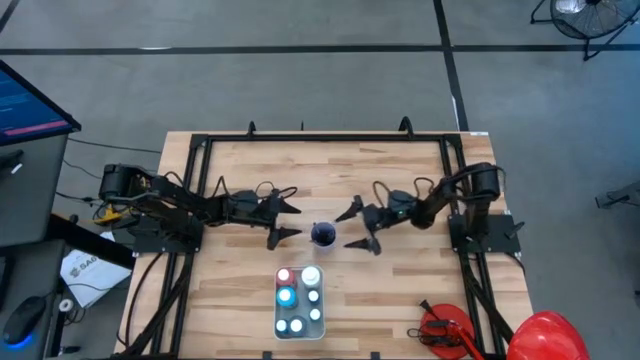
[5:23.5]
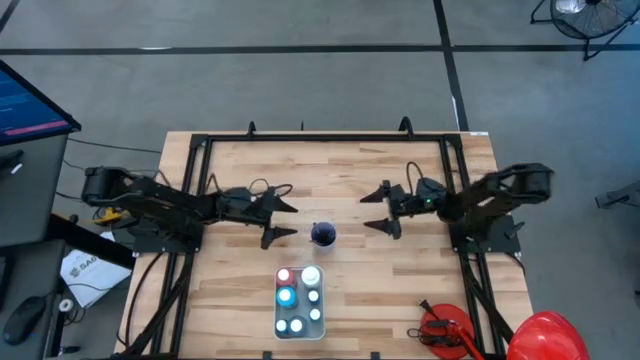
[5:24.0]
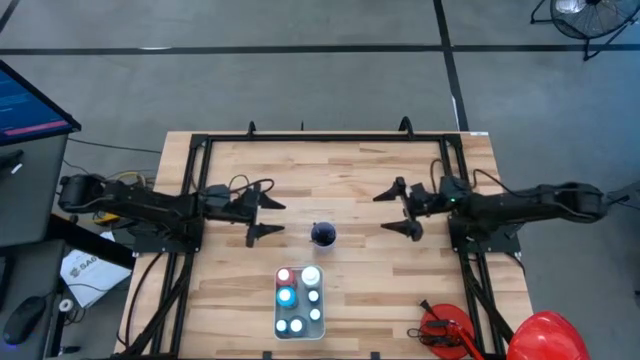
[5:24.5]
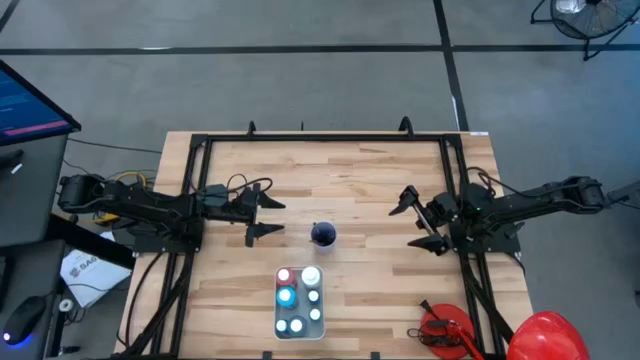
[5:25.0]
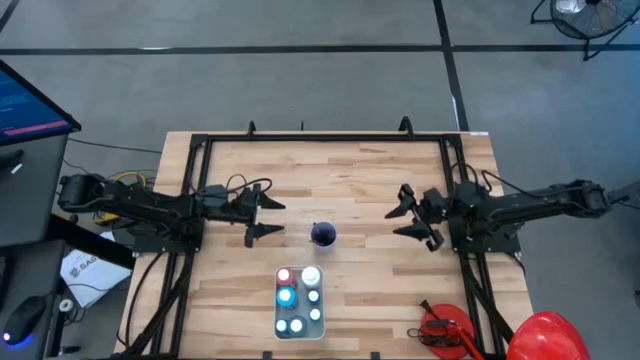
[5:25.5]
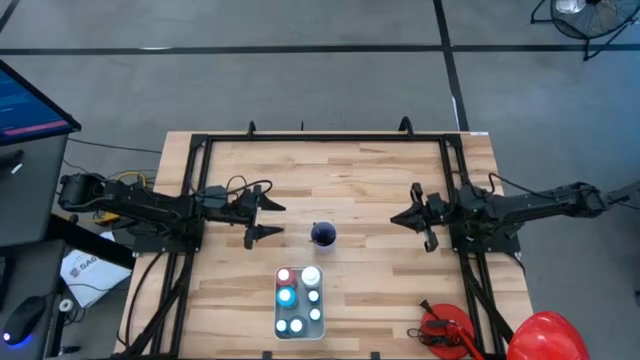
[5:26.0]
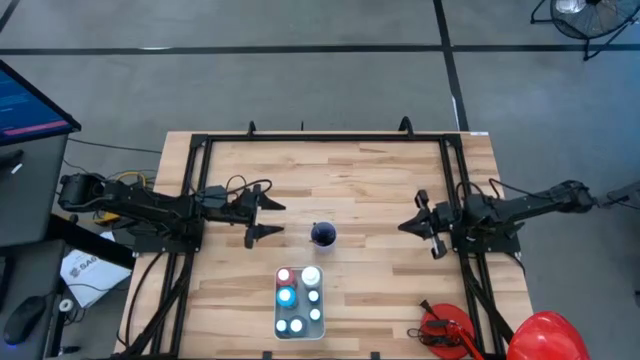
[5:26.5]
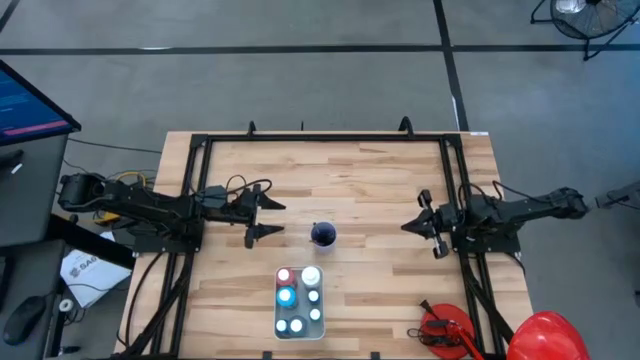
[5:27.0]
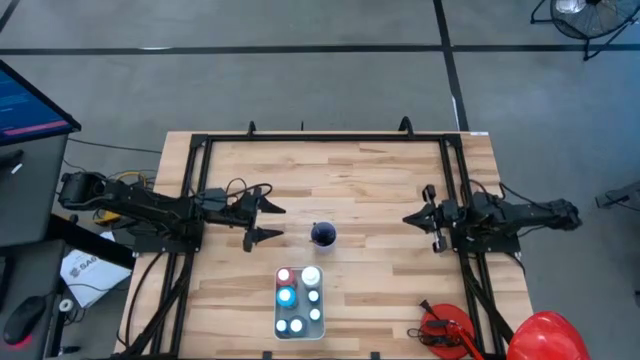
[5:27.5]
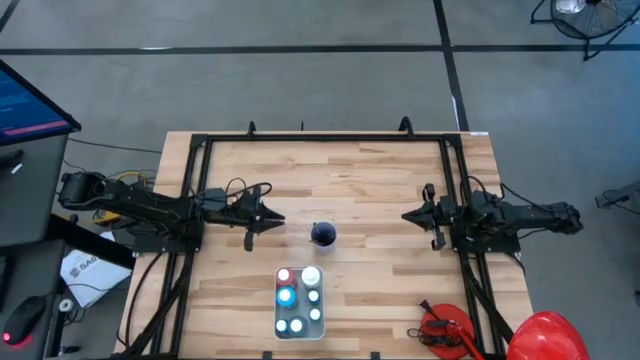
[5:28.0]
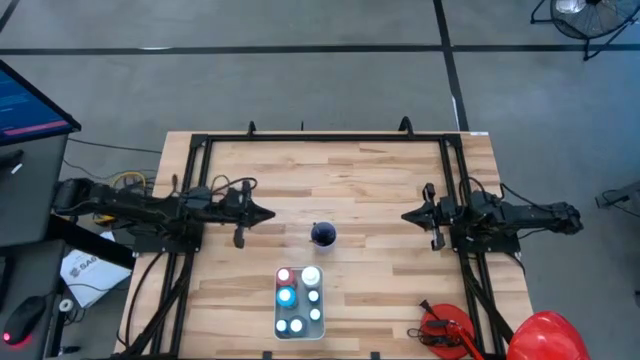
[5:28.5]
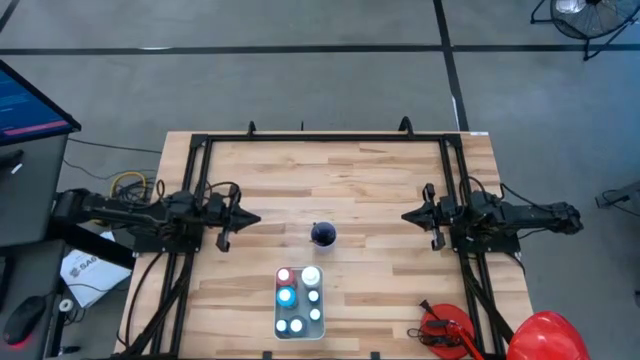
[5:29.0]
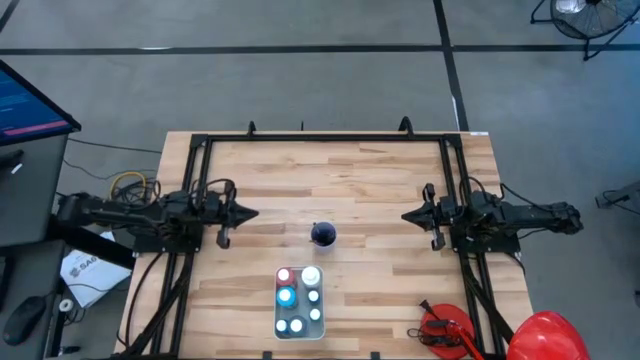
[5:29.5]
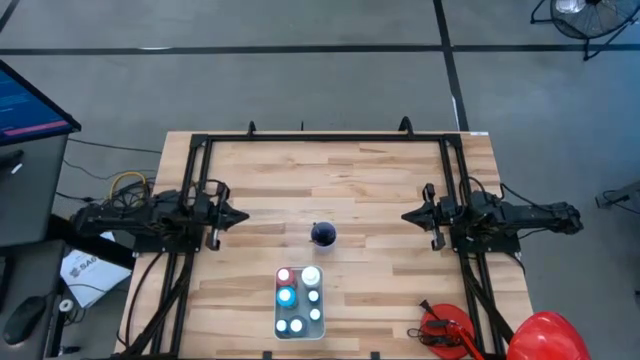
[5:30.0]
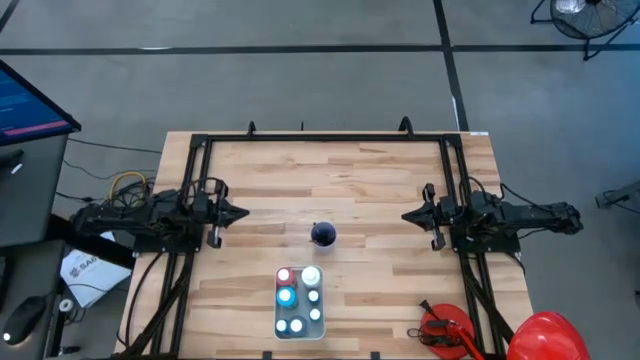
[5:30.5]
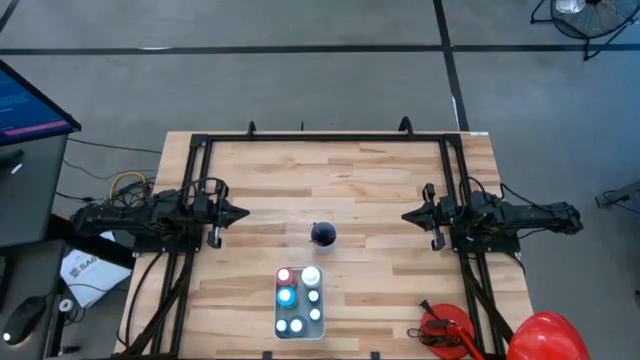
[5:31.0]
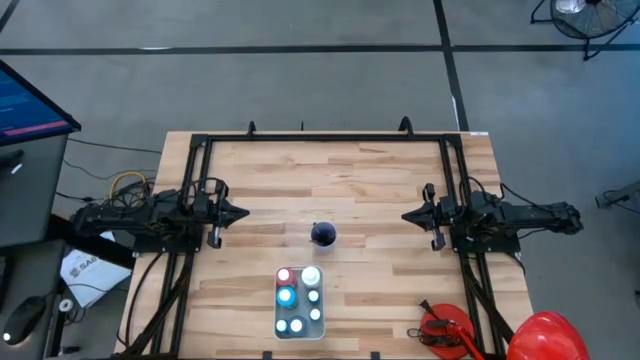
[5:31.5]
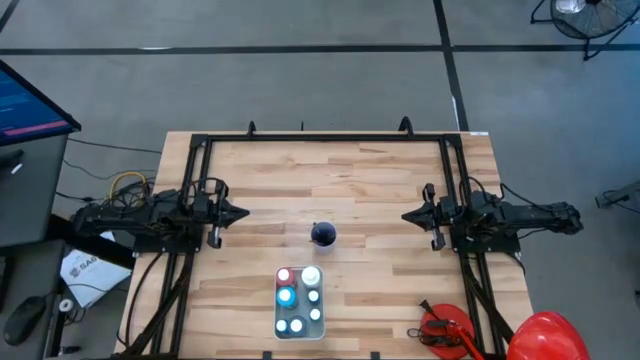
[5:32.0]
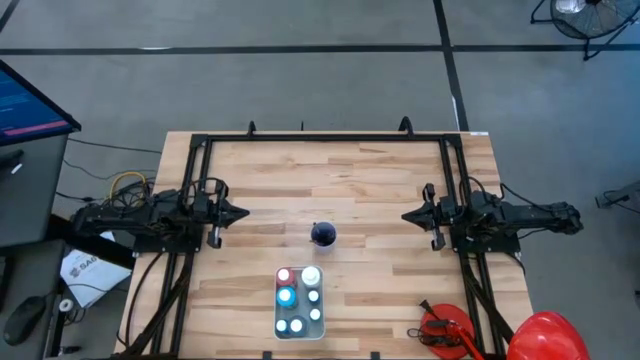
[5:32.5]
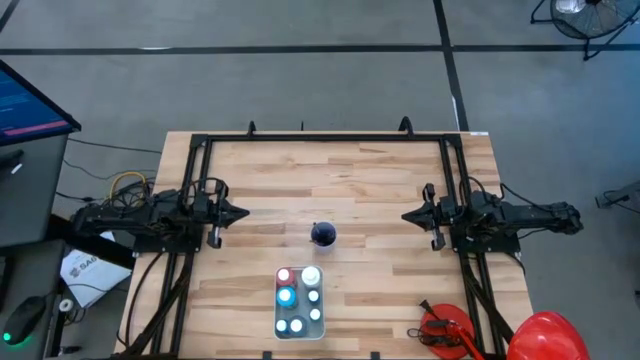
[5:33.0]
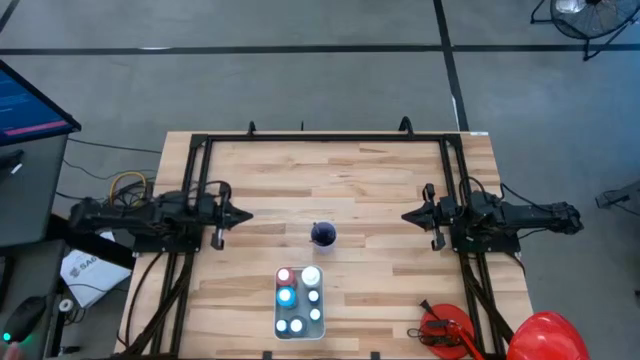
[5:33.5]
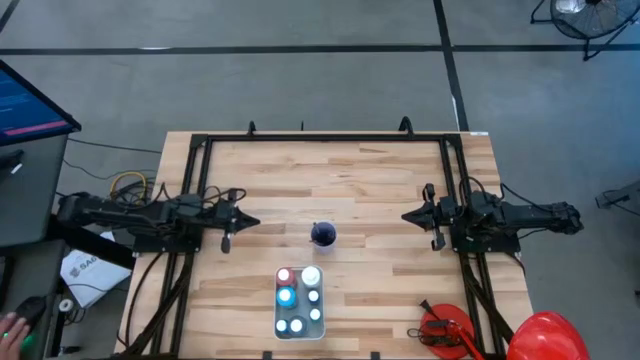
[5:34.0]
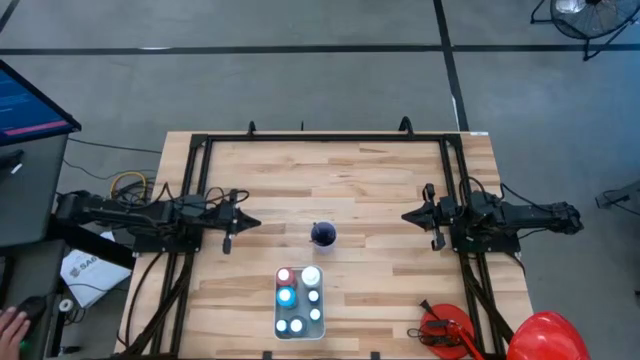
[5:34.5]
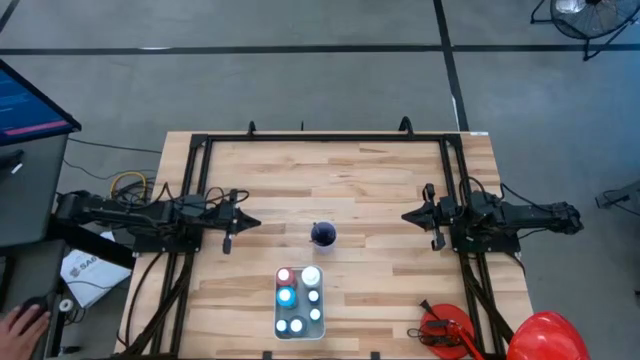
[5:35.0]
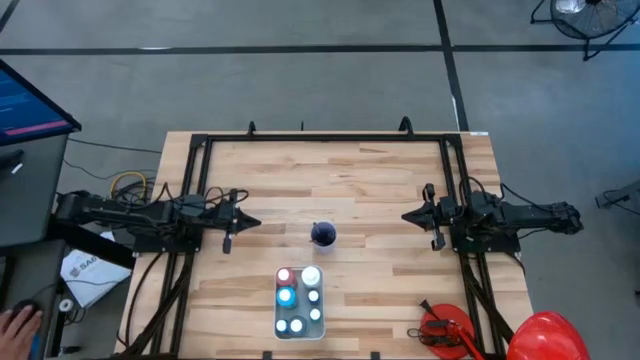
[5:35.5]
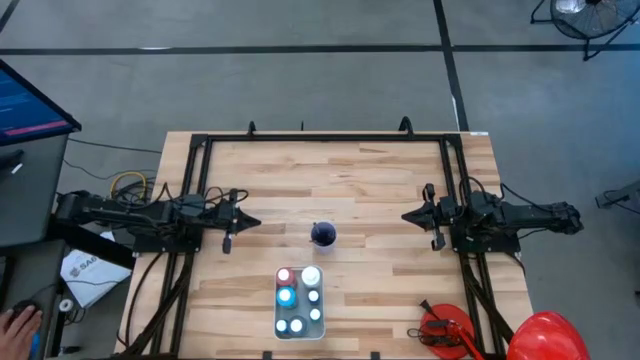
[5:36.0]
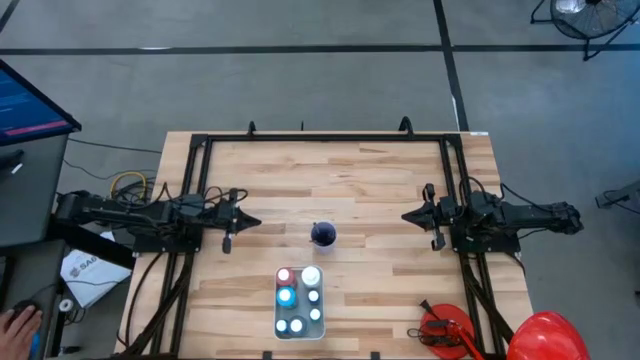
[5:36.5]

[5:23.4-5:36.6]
Task: Pick & Place Paint Supplies
Return to home position

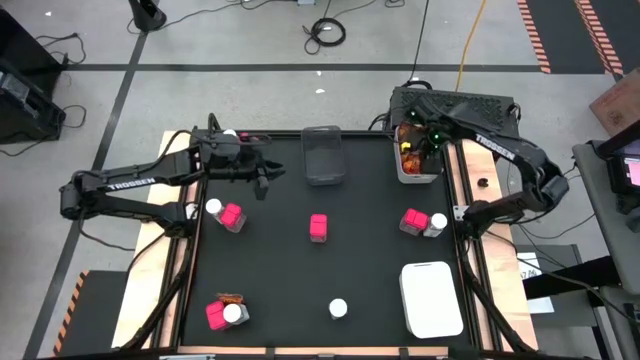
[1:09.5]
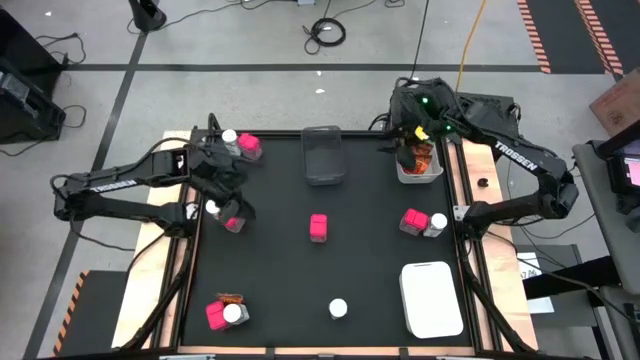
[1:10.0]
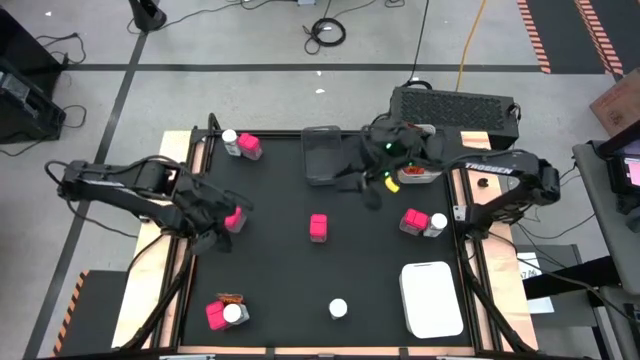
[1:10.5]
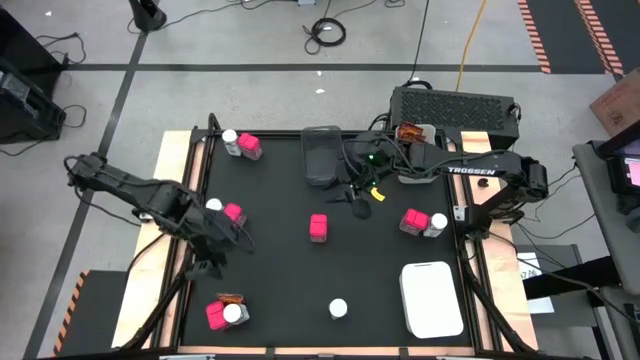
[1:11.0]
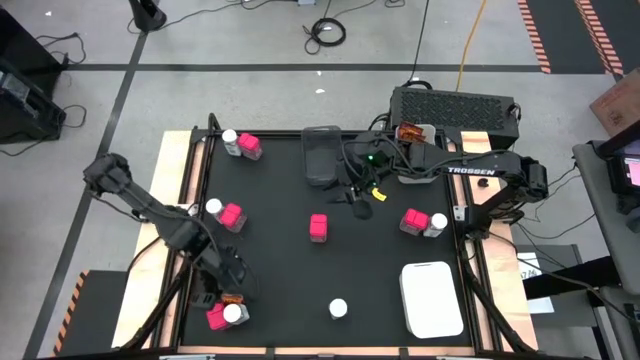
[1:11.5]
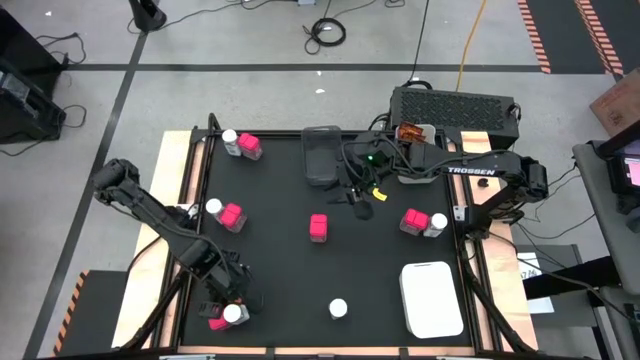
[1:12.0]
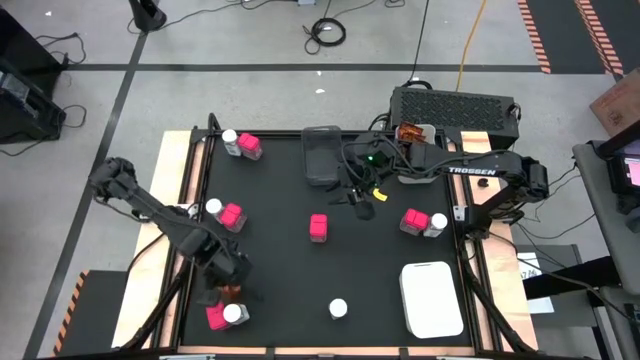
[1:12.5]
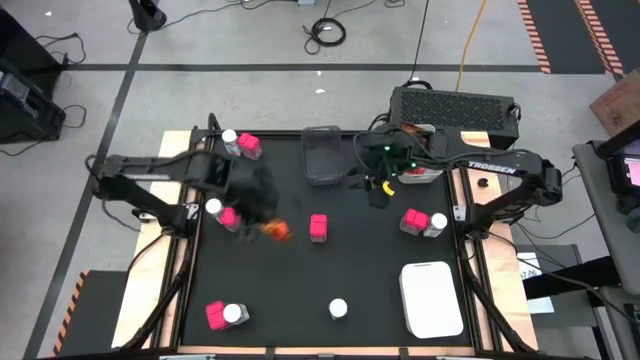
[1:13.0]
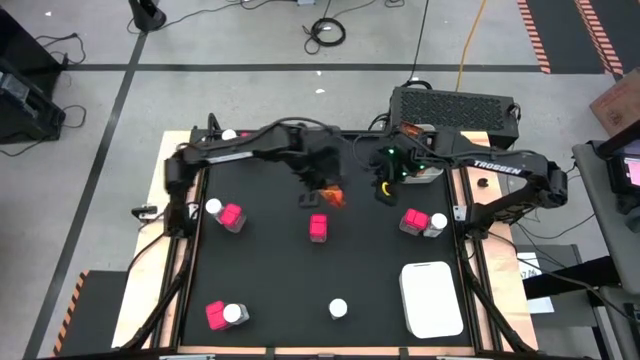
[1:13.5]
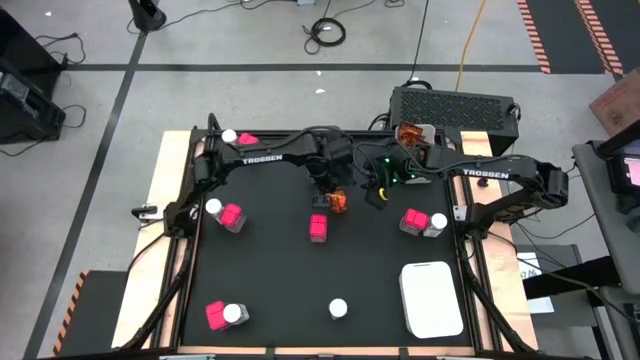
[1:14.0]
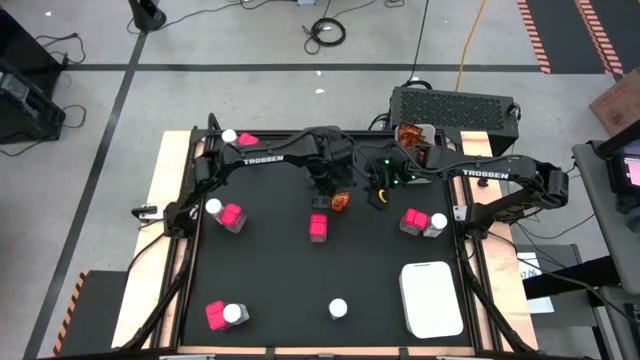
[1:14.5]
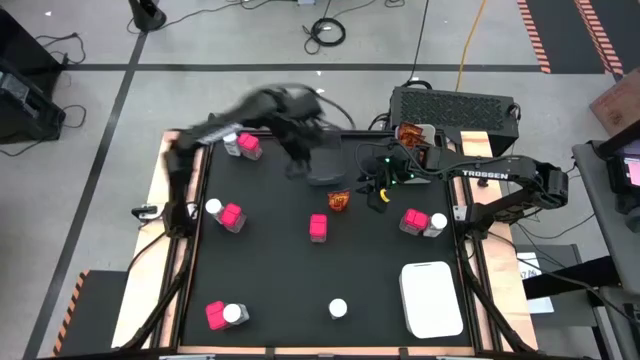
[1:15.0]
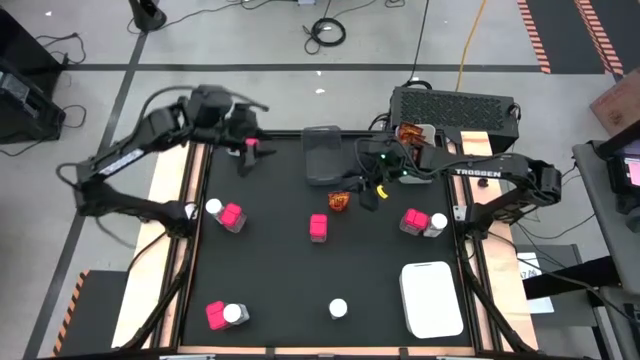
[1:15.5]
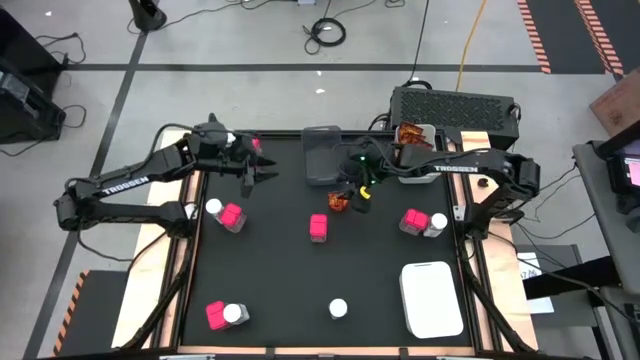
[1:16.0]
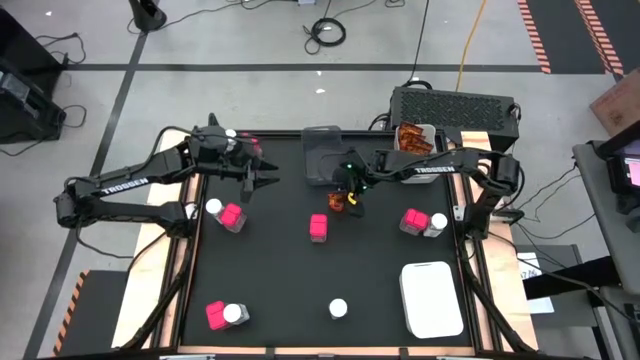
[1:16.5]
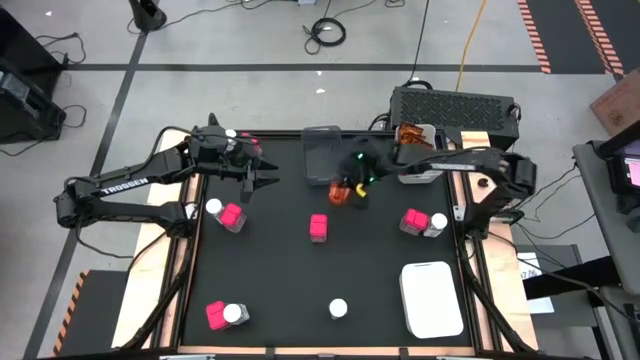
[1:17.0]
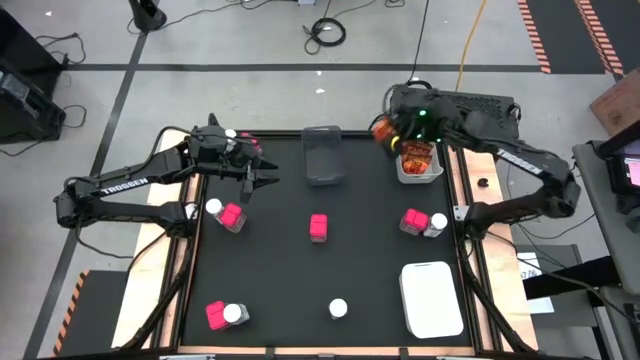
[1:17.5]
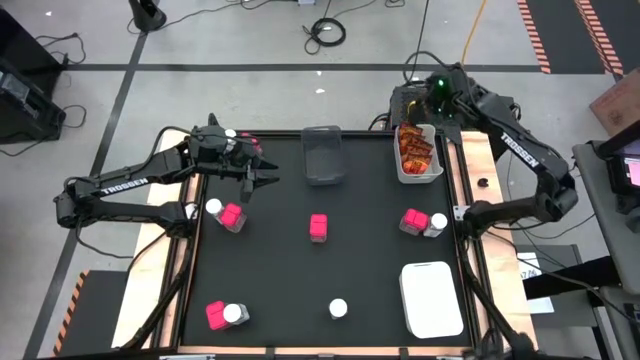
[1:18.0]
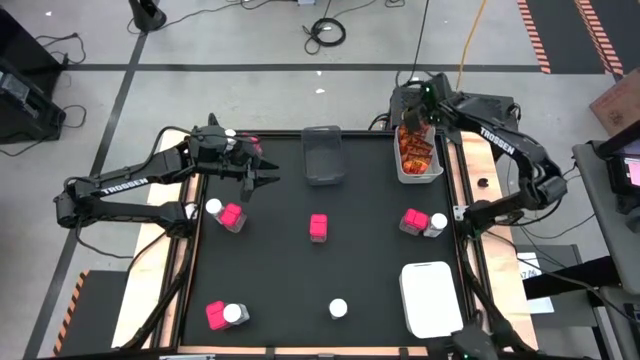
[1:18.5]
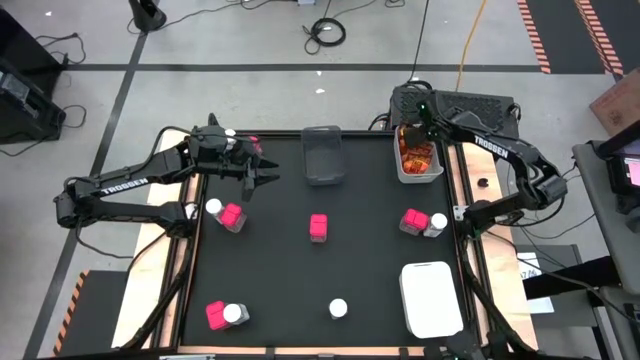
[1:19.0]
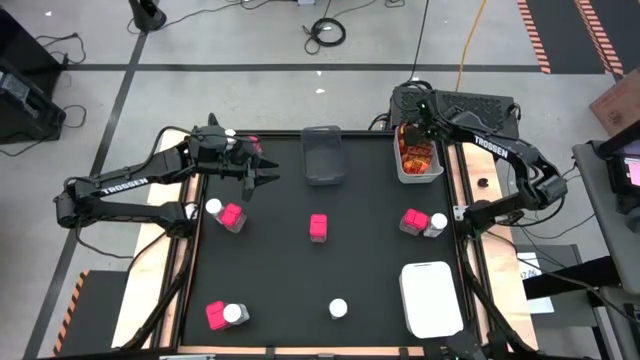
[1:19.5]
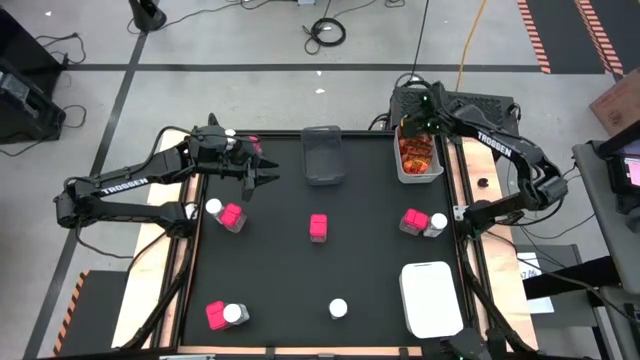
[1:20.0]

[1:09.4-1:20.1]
Task: Sort spices by type
Put the orange seasoning pack into the top white bin
